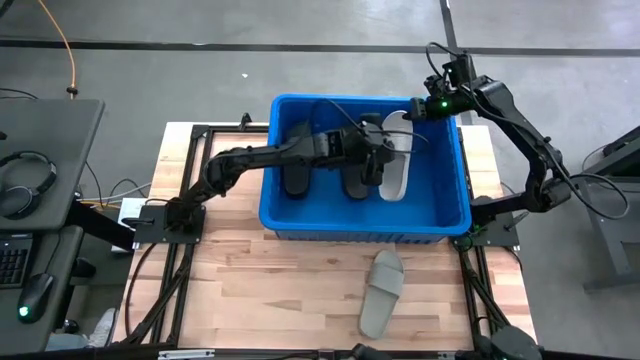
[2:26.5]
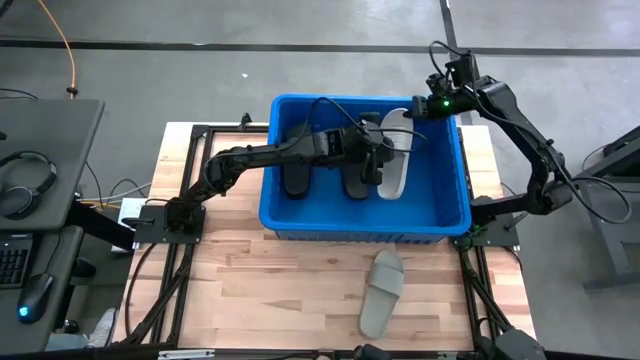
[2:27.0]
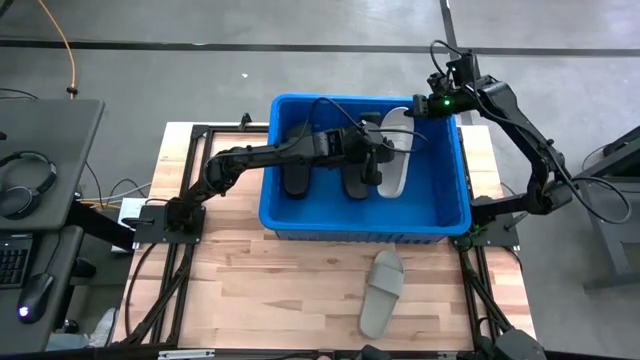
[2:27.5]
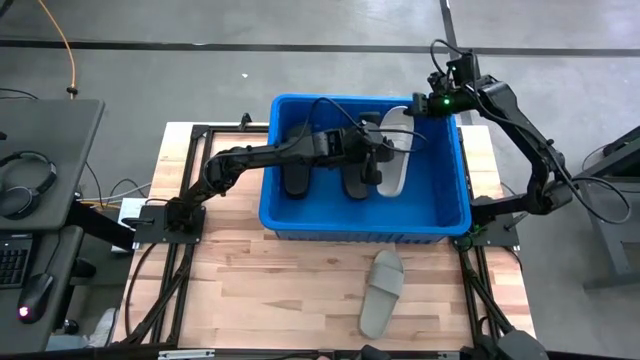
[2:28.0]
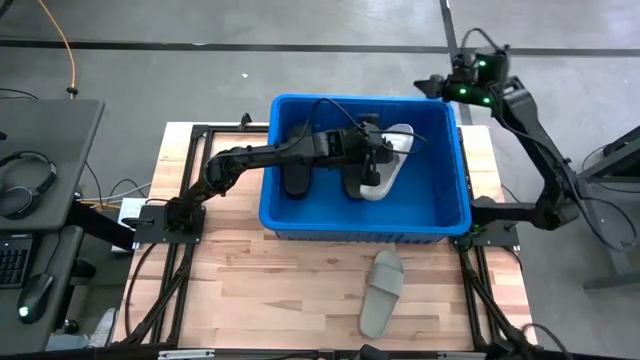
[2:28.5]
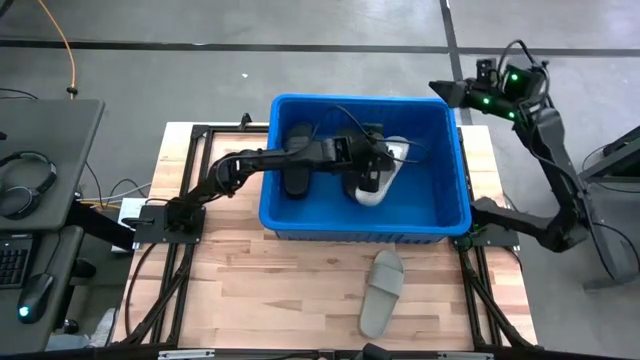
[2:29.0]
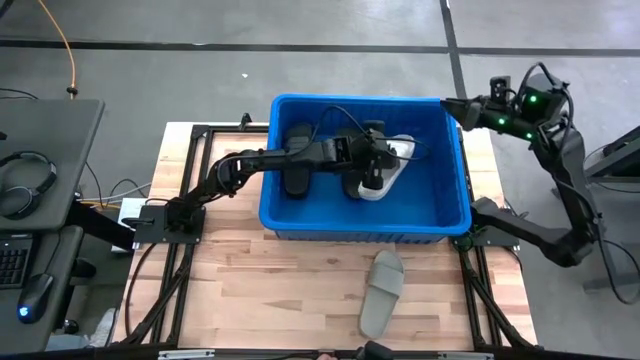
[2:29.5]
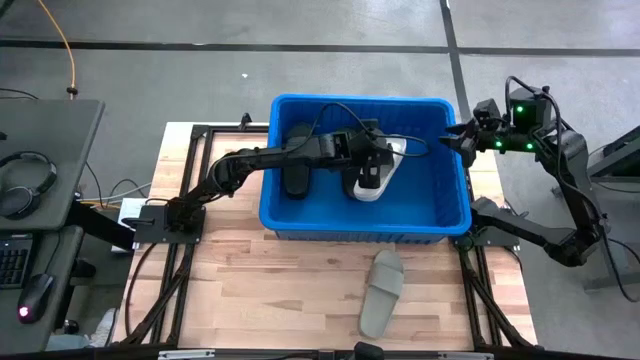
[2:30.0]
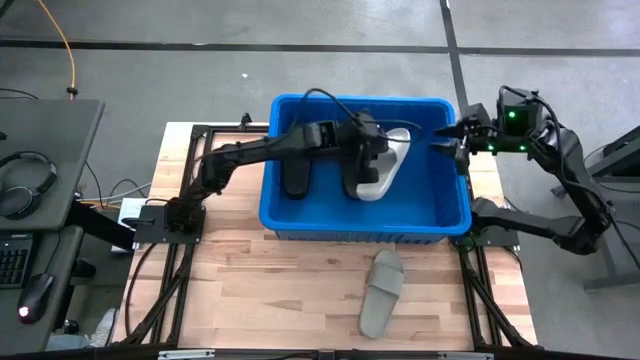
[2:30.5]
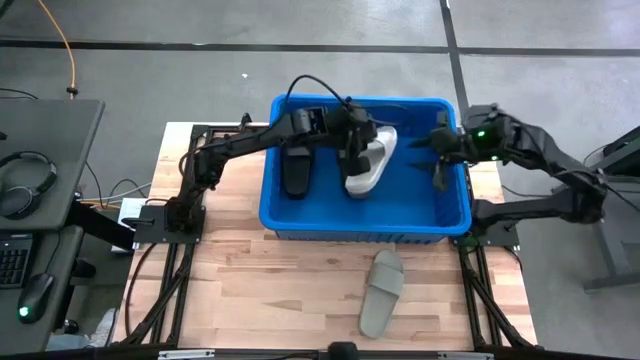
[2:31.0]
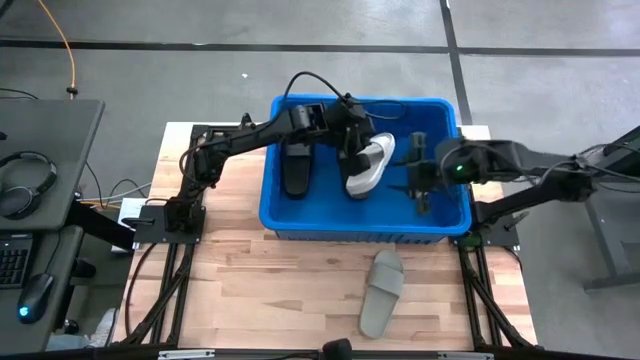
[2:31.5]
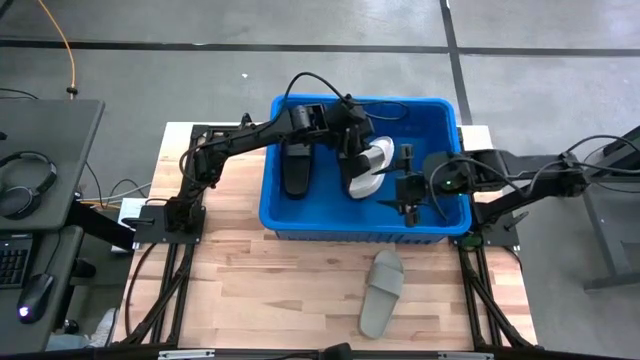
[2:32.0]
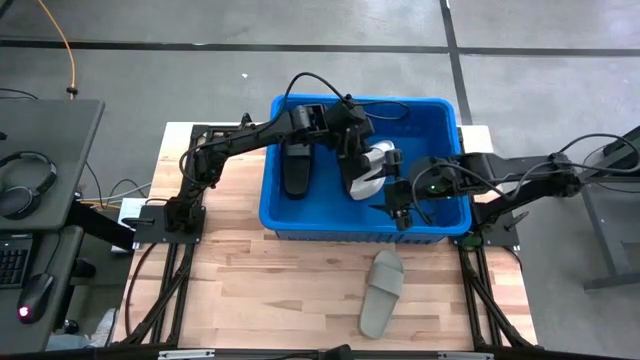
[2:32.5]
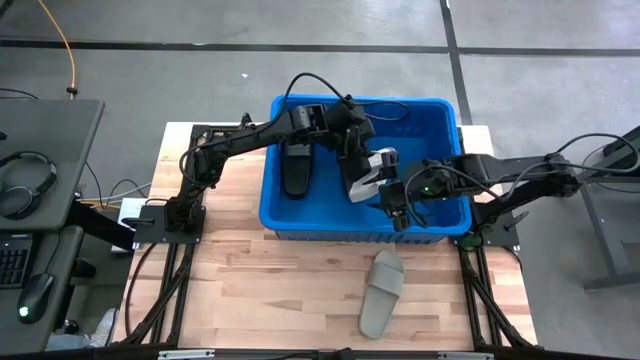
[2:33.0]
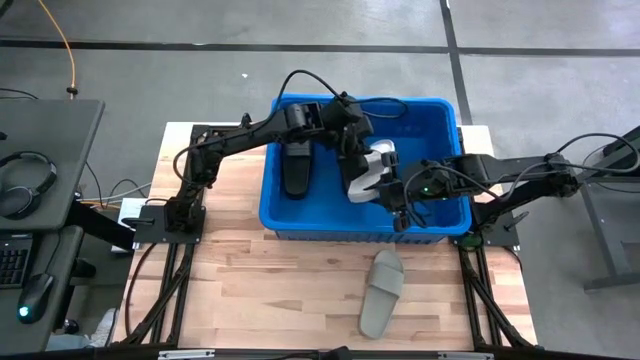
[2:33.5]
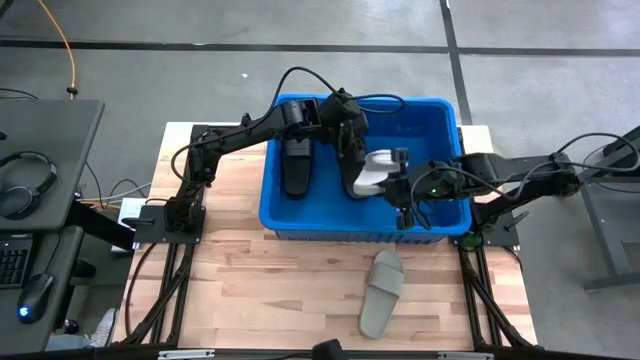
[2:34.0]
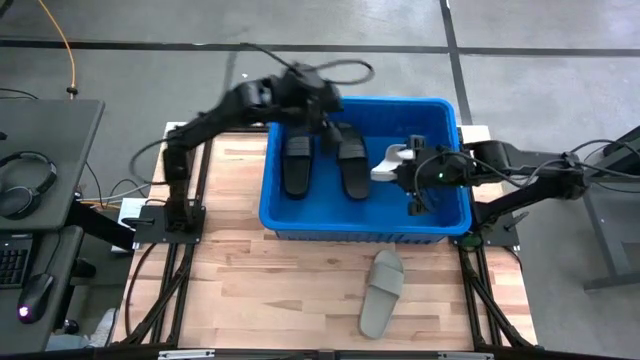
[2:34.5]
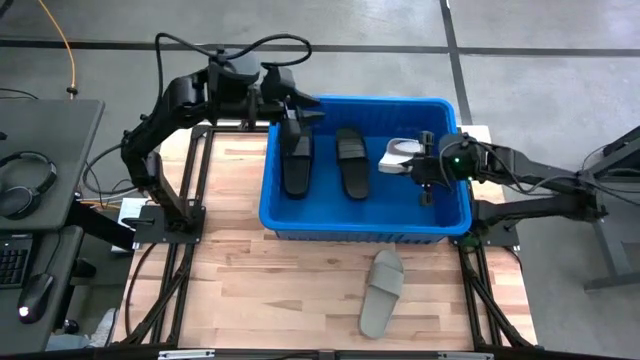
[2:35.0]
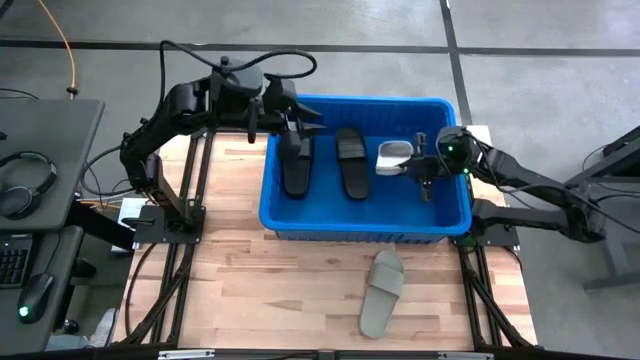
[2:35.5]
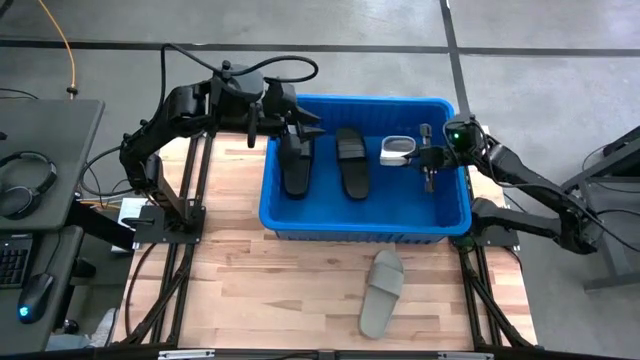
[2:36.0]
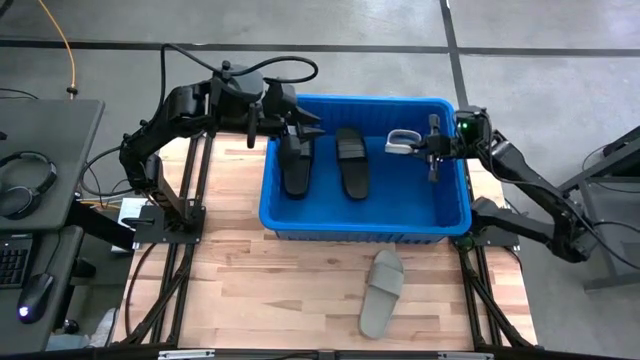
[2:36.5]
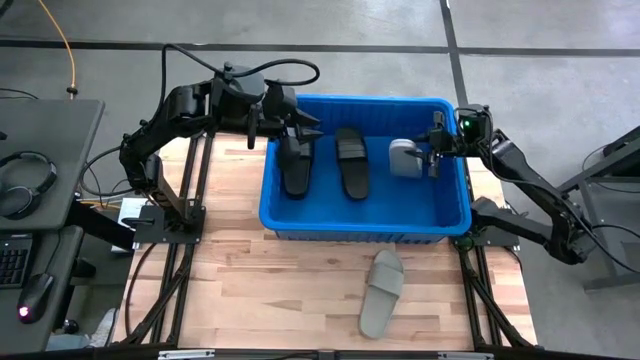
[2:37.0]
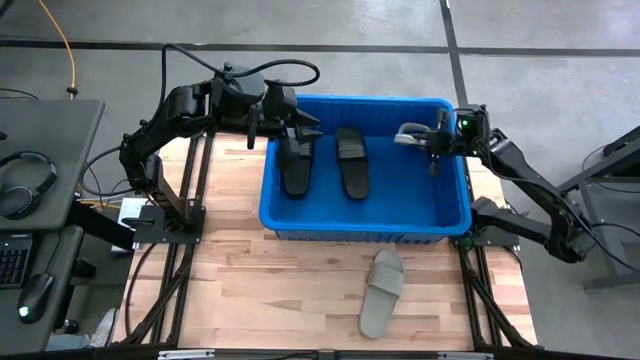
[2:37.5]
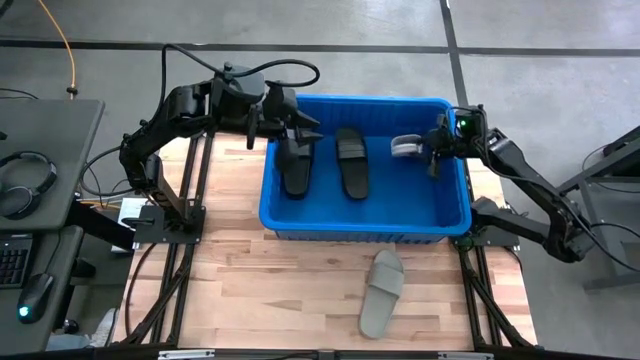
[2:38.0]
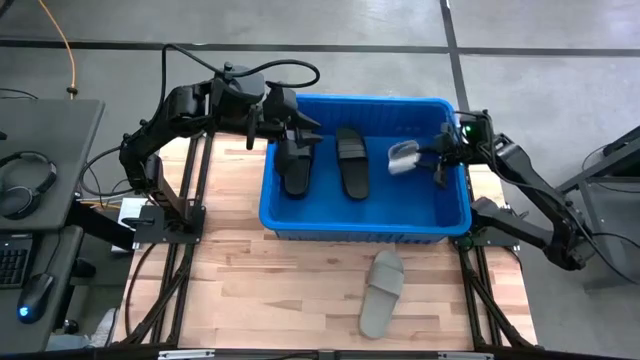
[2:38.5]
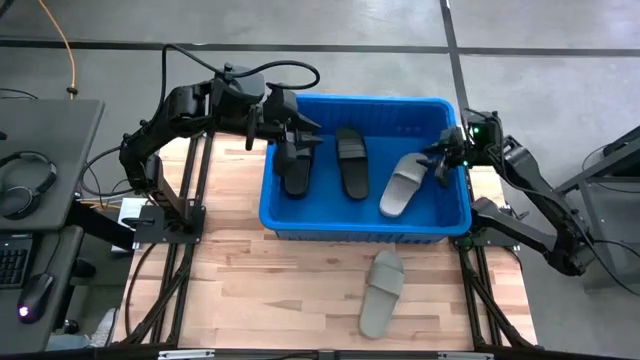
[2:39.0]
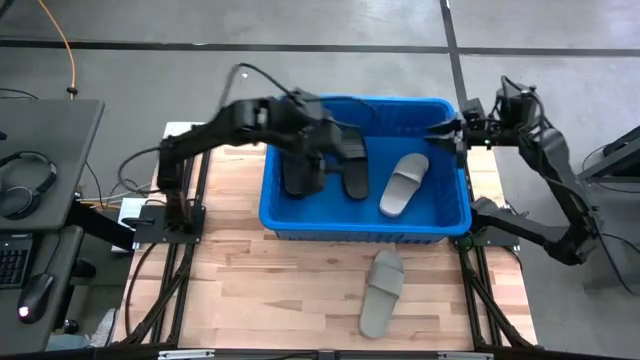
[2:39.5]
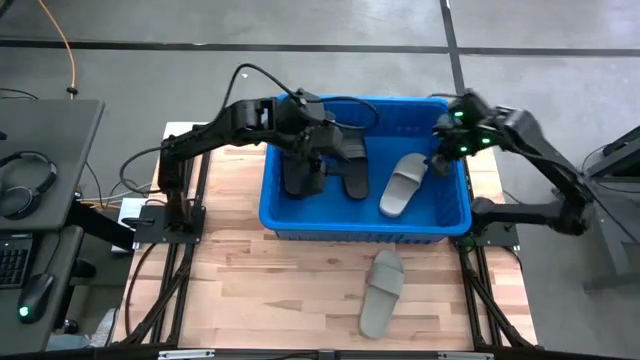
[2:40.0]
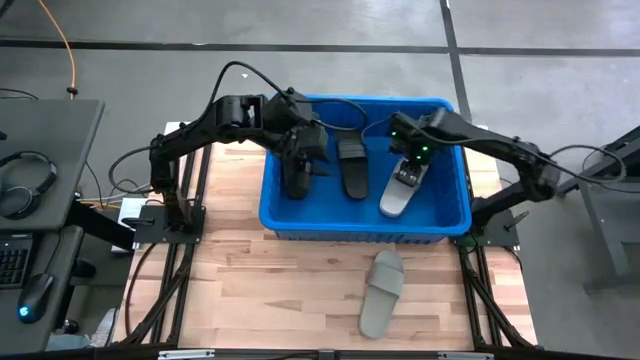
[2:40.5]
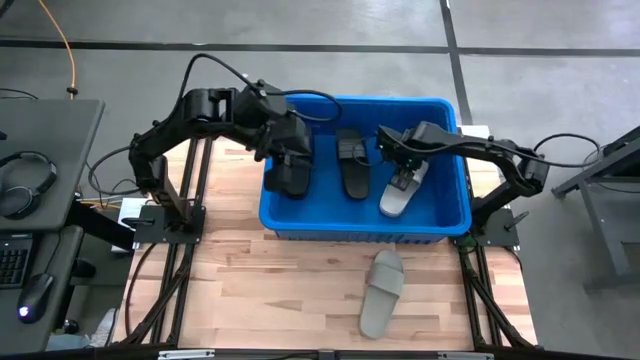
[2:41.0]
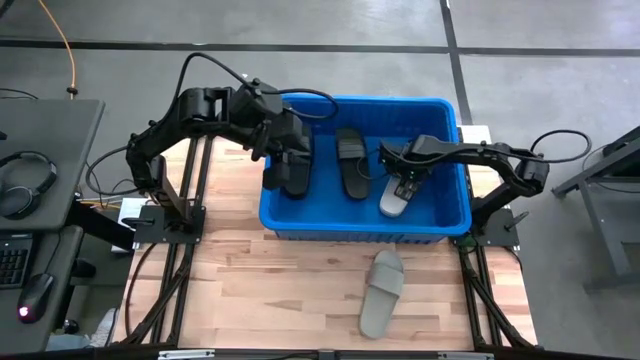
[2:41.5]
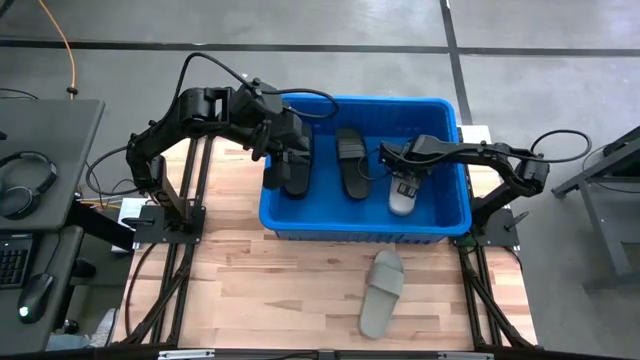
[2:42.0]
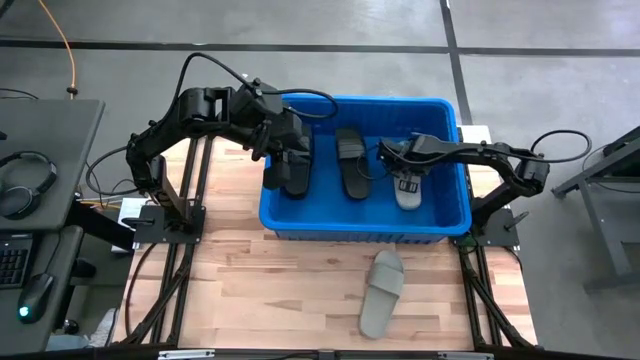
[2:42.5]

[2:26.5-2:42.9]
Task: Pick and place slides into bin
Put the gray slides into the blue bin

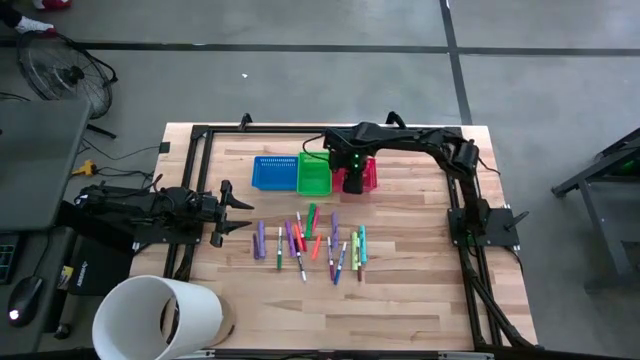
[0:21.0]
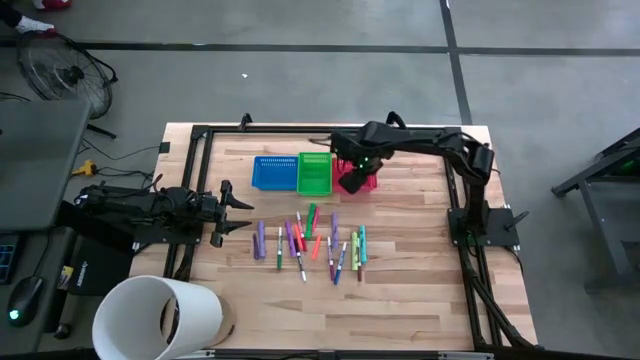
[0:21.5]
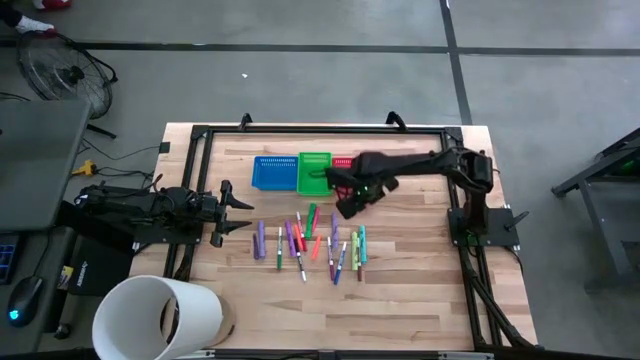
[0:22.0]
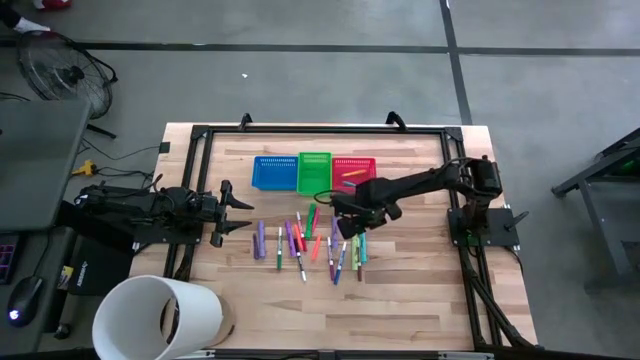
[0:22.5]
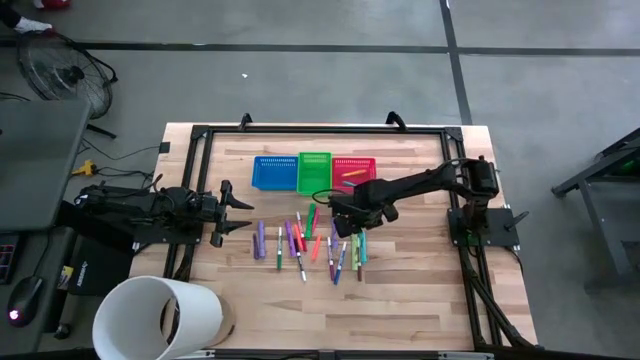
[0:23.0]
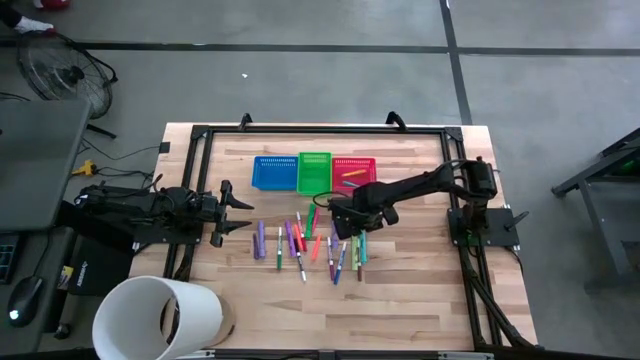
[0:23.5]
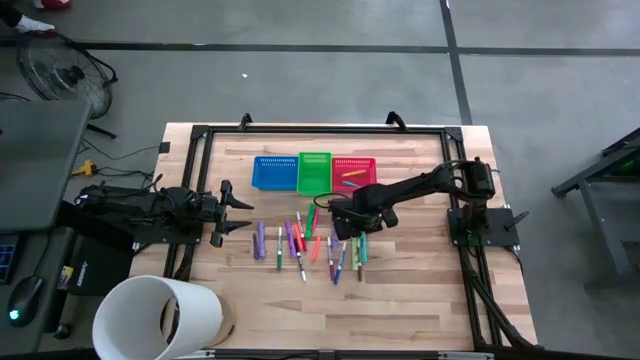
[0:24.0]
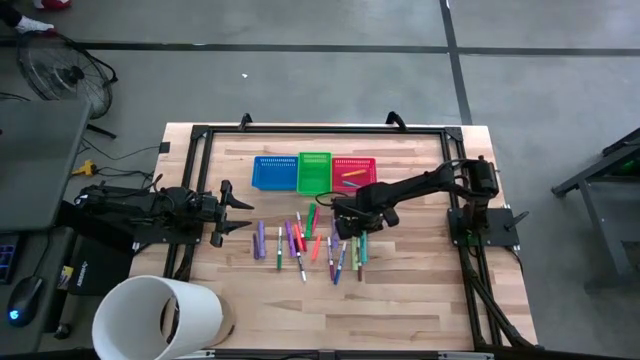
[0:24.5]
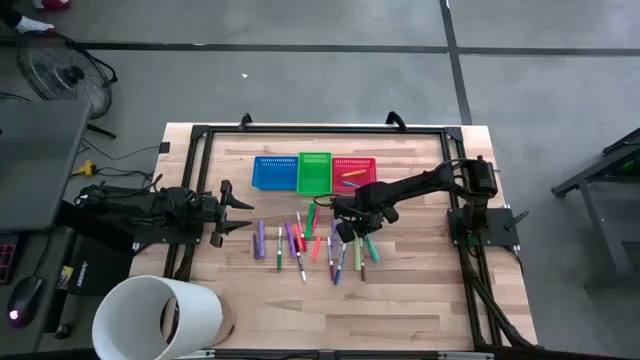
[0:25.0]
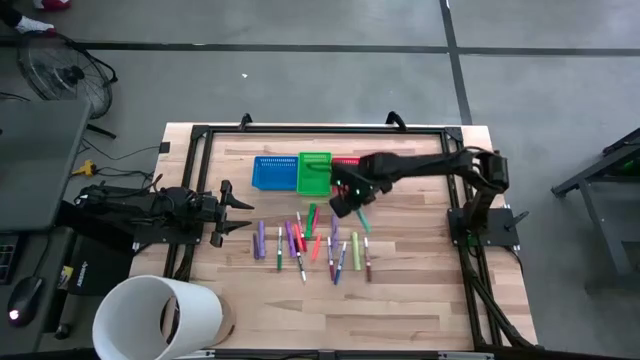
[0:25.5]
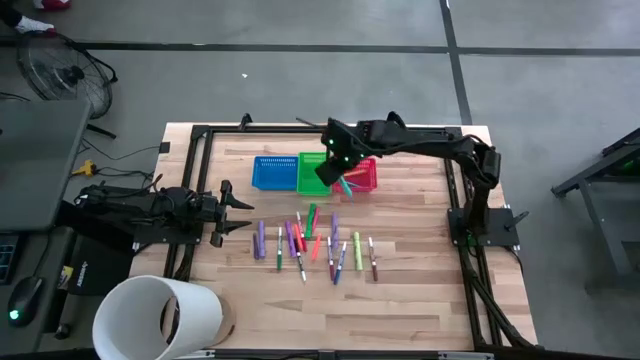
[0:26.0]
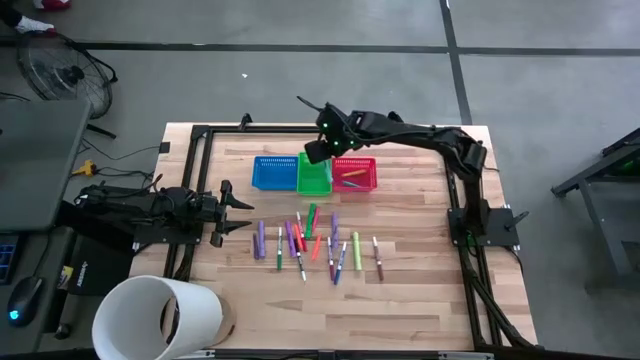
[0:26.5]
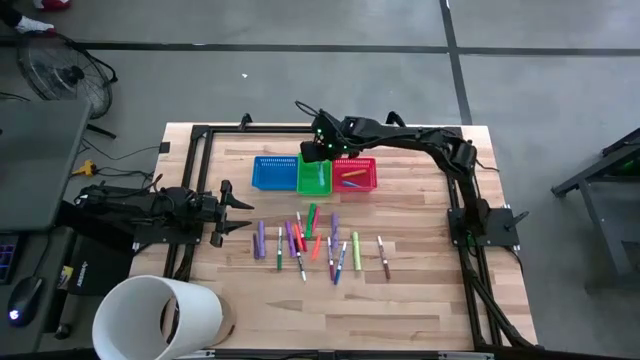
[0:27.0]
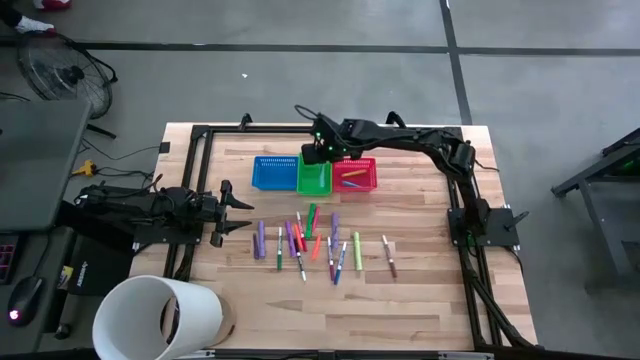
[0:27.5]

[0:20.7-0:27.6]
Task: Pick & Place Markers
Put the light blue highlighter into the green bin
